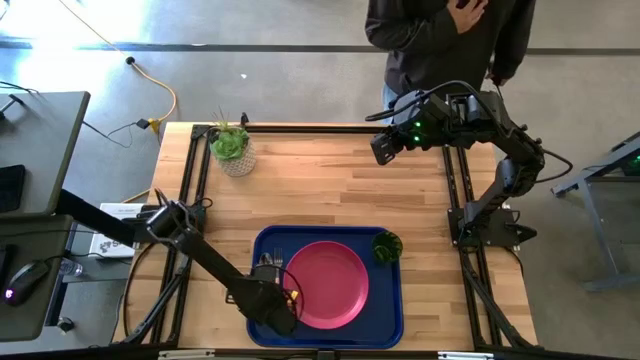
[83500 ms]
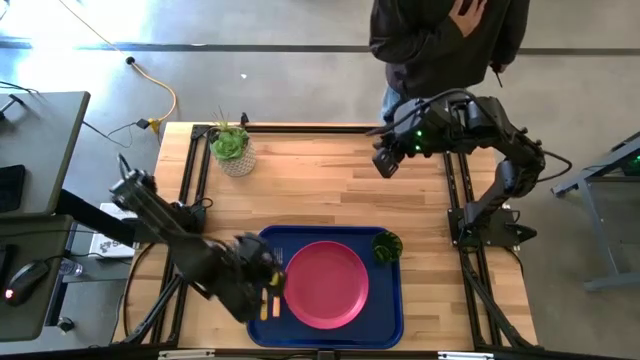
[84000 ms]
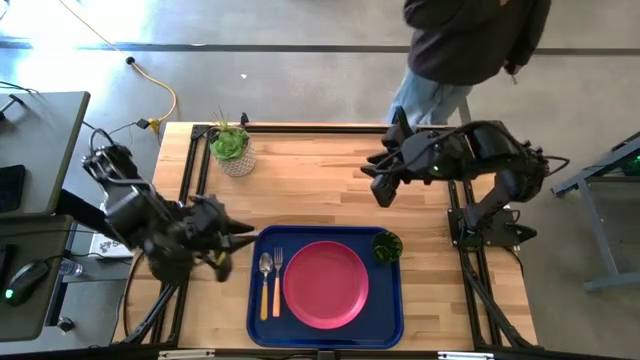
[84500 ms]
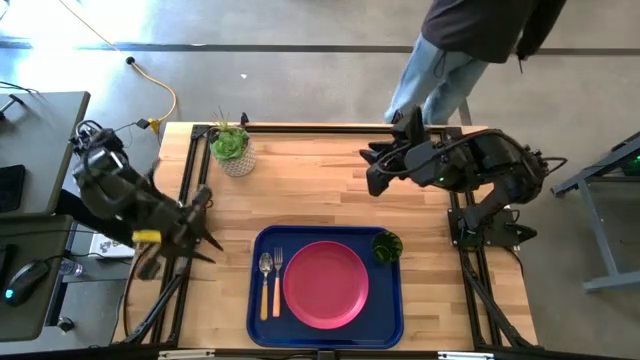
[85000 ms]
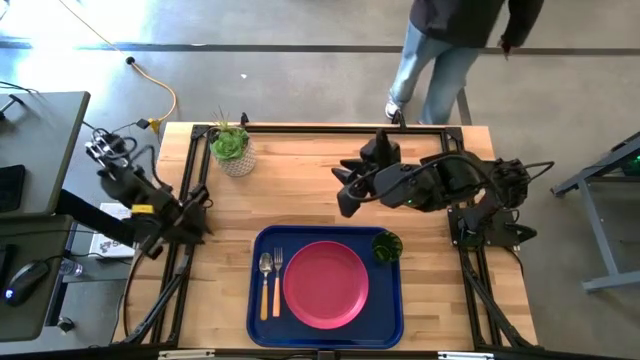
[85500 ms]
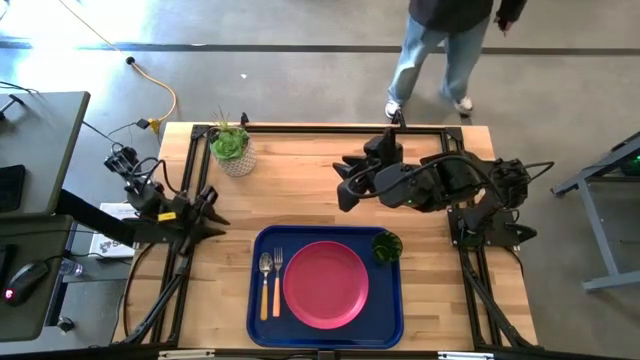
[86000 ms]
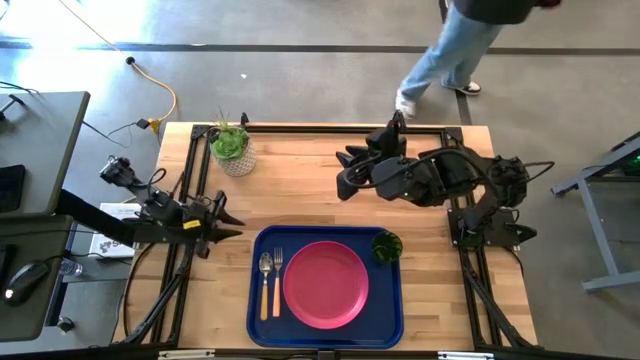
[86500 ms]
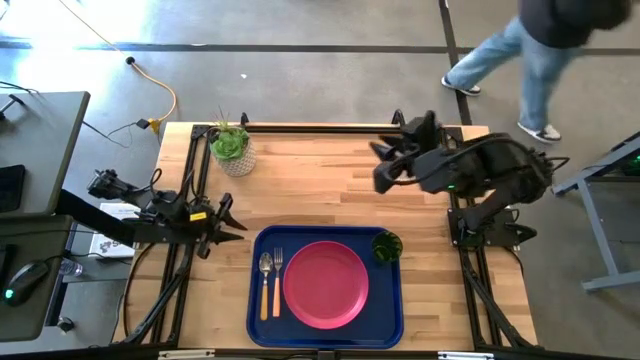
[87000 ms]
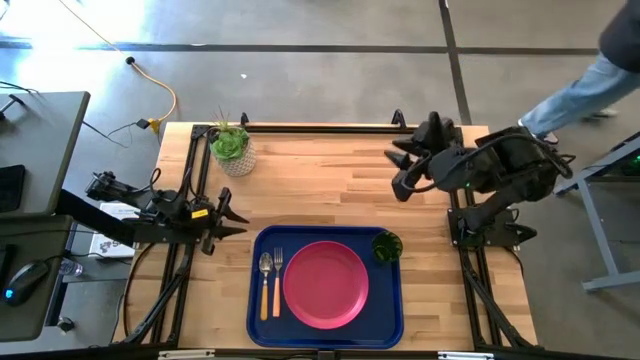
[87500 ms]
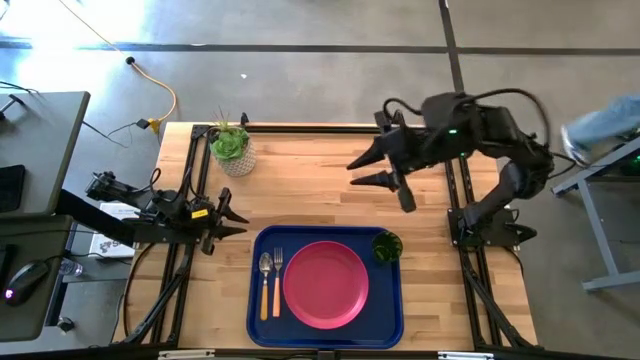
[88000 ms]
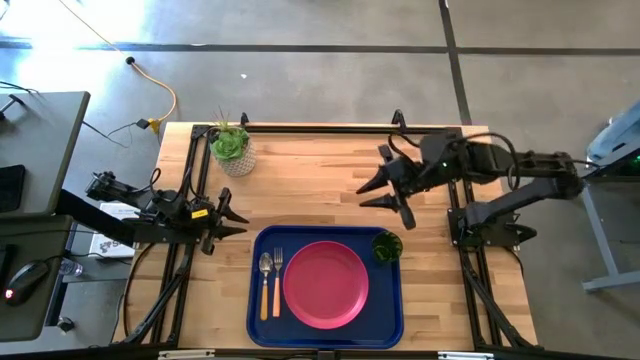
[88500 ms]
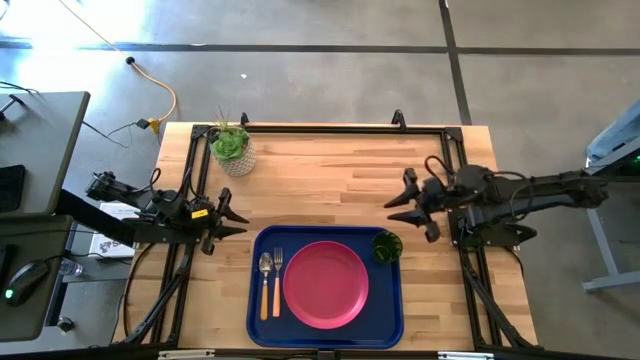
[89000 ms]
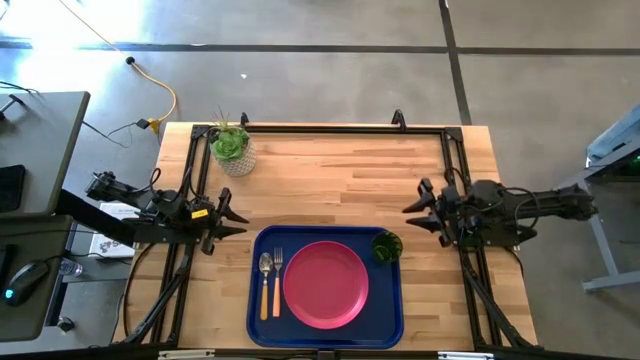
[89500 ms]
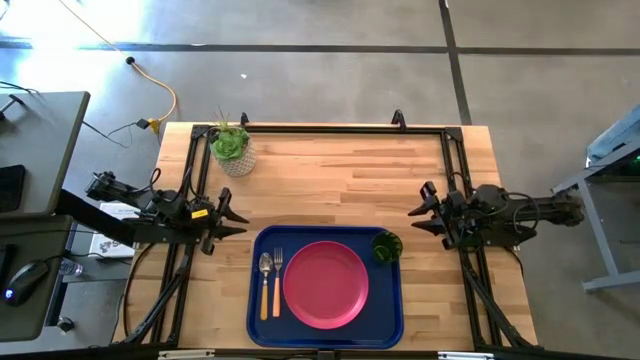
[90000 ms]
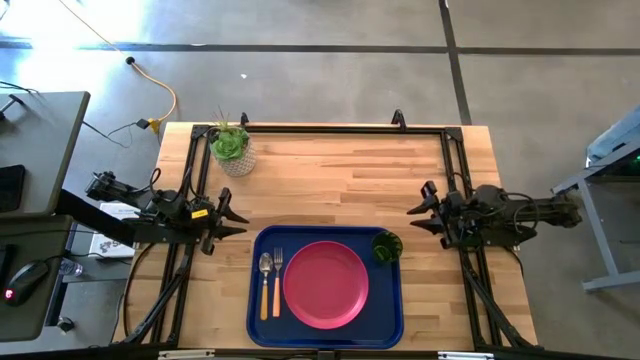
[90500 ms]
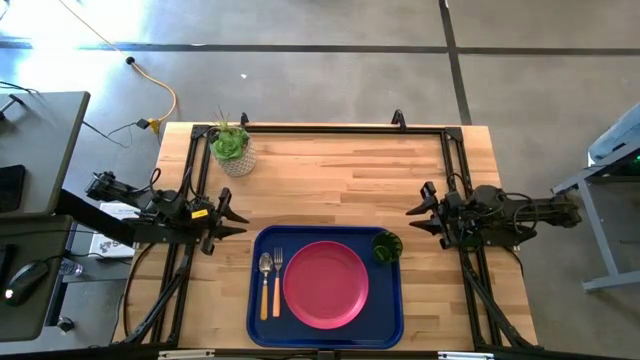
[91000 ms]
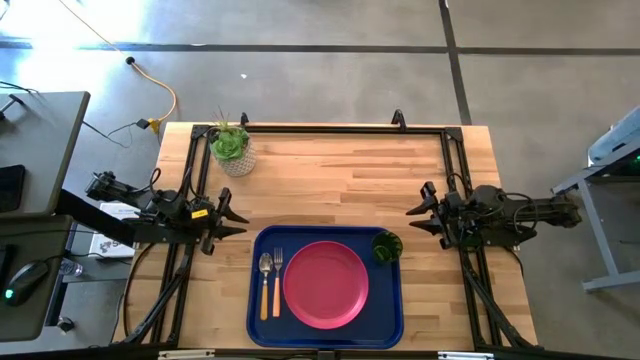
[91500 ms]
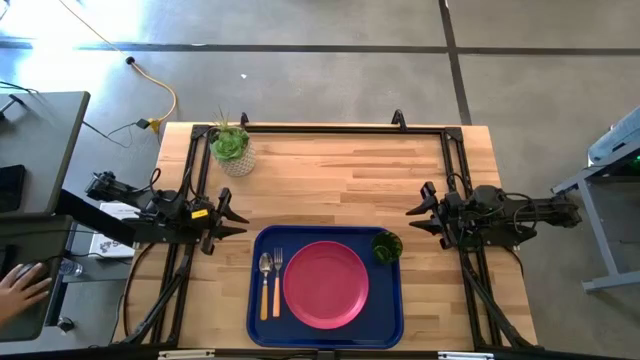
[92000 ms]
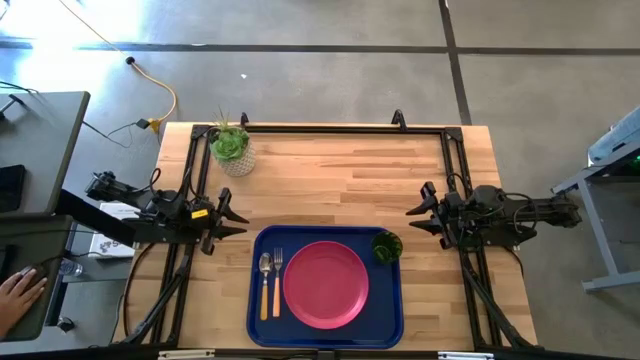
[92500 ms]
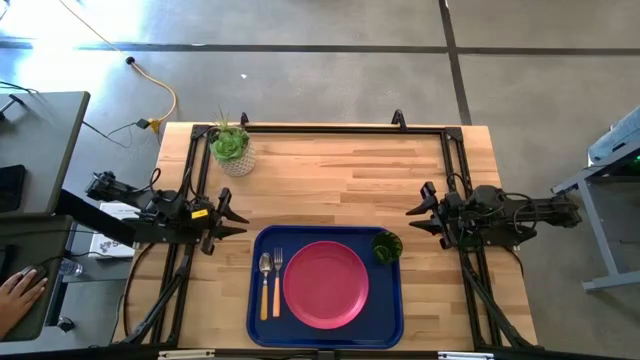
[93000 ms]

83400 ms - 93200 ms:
Task: Pick and place plate/cup/fork/spoon on tray
Return to Home Position

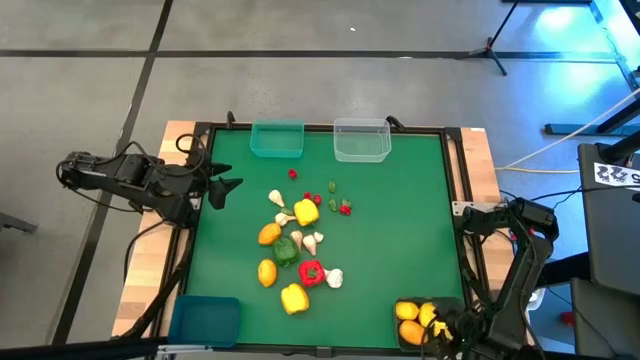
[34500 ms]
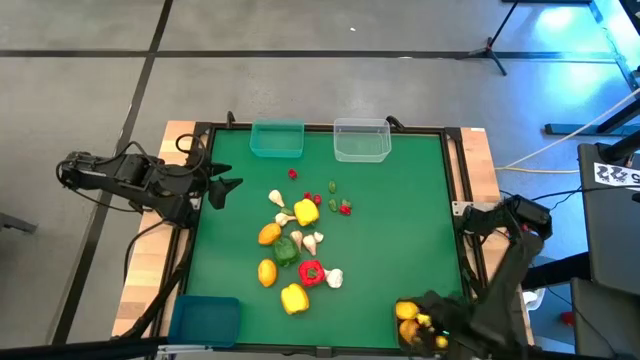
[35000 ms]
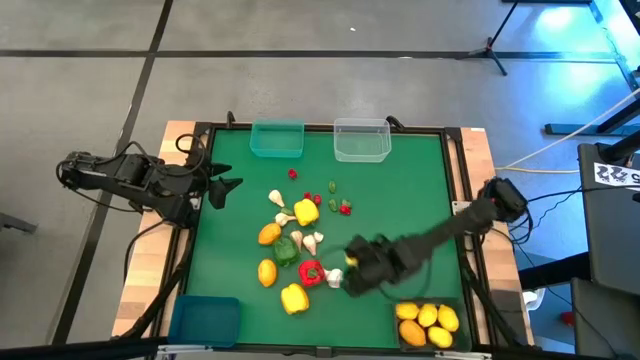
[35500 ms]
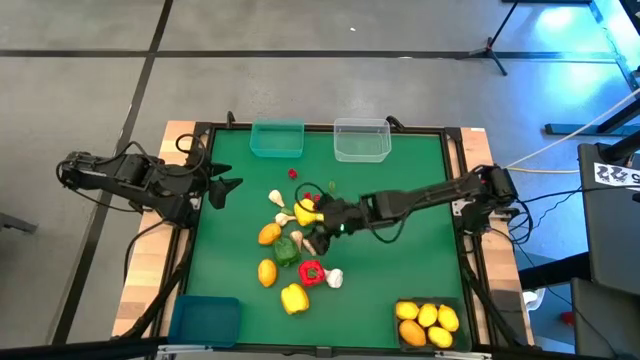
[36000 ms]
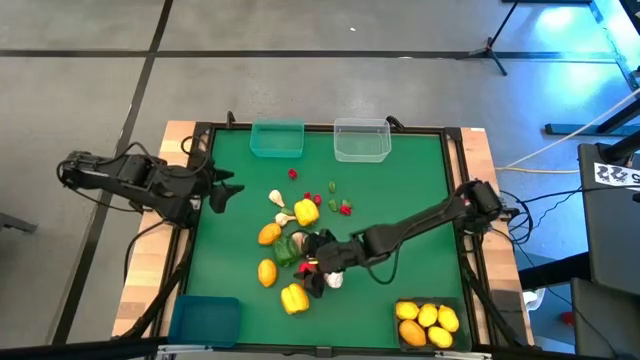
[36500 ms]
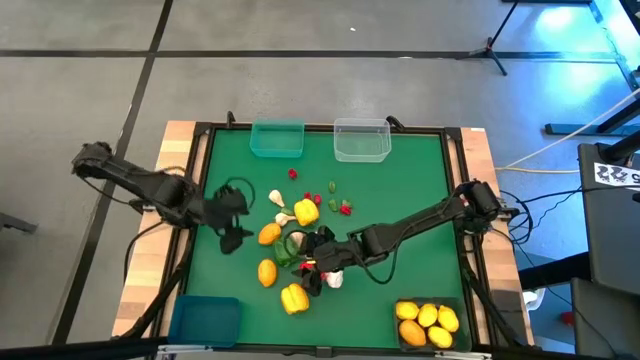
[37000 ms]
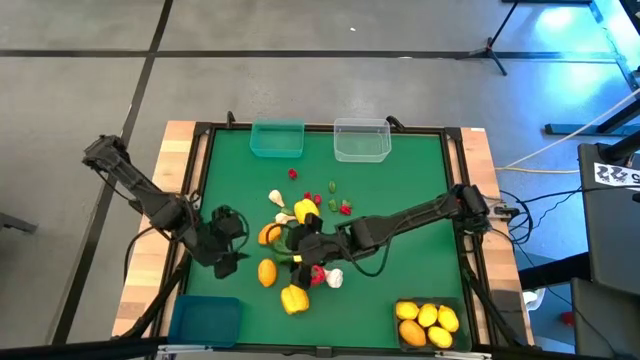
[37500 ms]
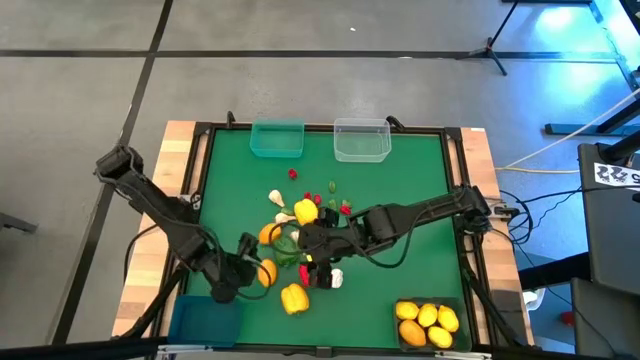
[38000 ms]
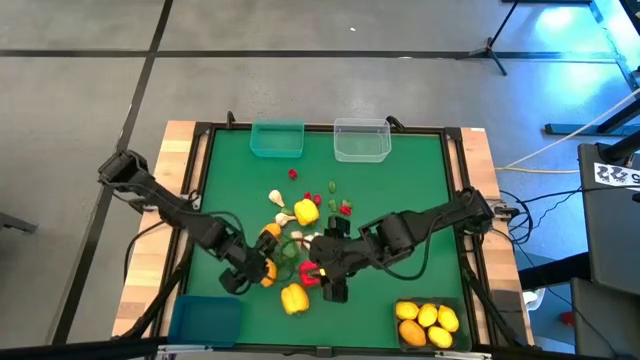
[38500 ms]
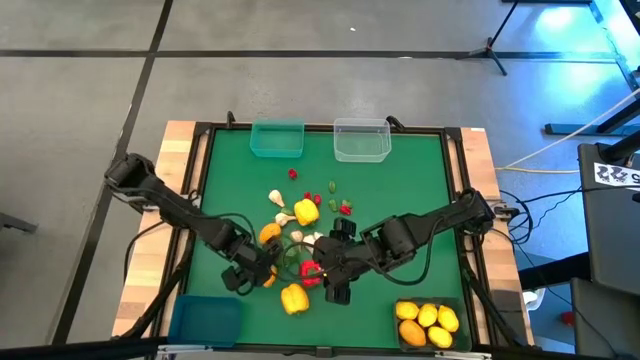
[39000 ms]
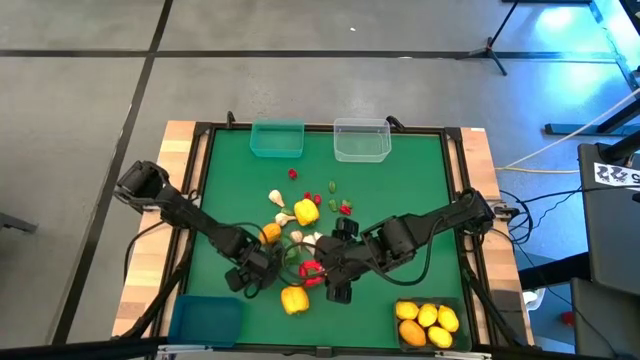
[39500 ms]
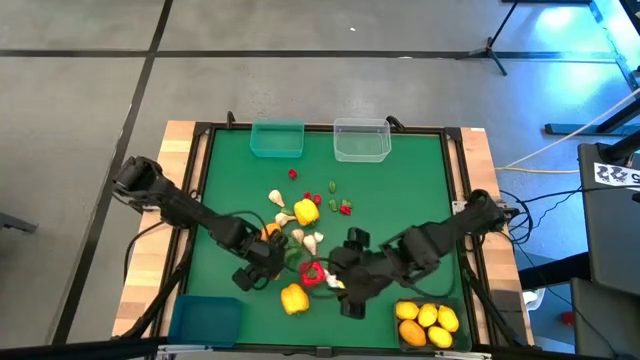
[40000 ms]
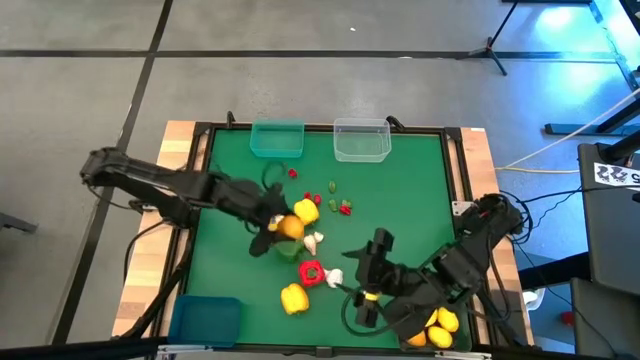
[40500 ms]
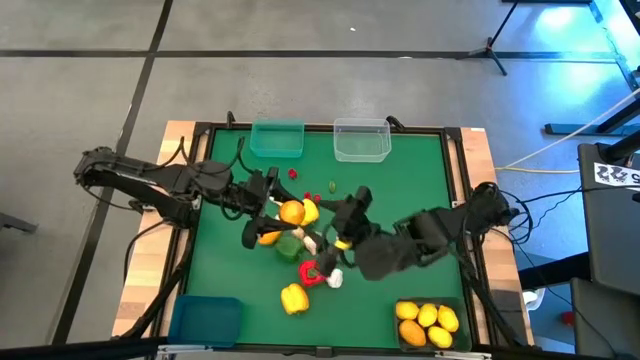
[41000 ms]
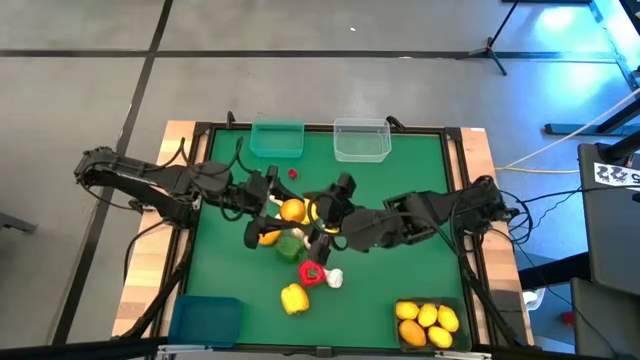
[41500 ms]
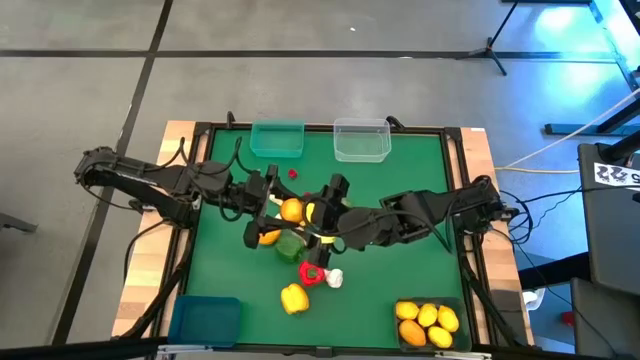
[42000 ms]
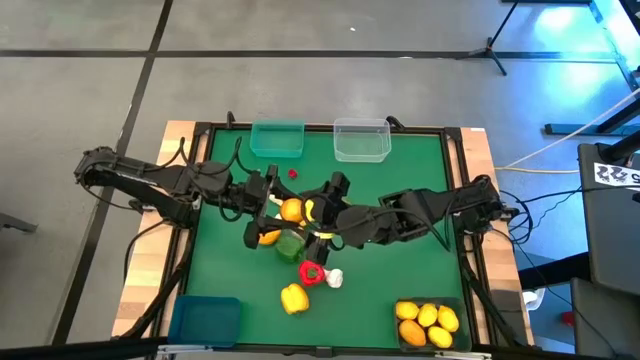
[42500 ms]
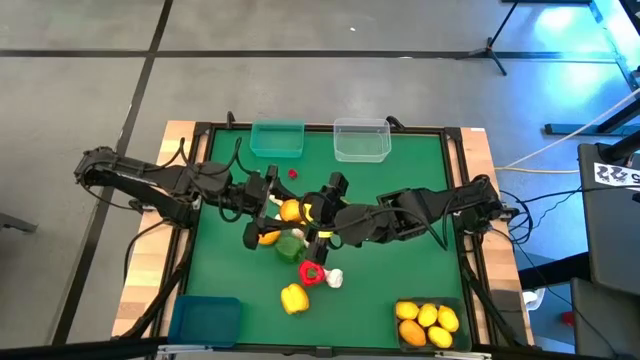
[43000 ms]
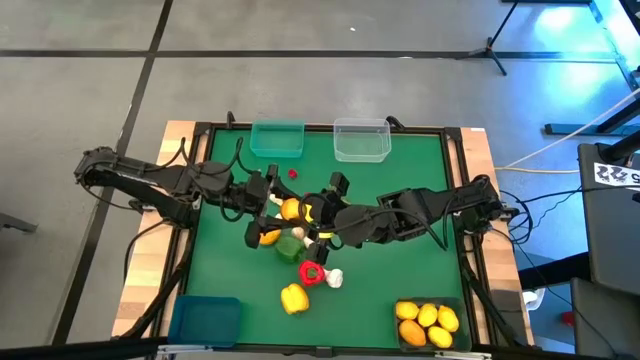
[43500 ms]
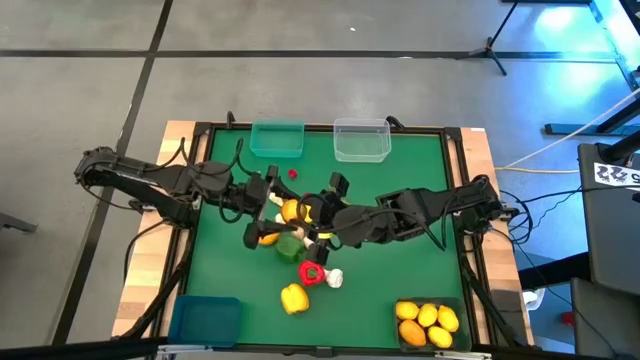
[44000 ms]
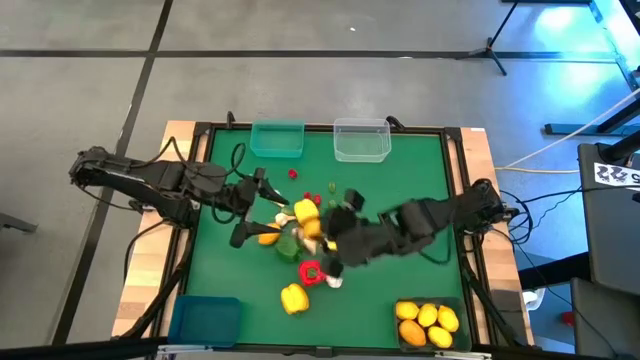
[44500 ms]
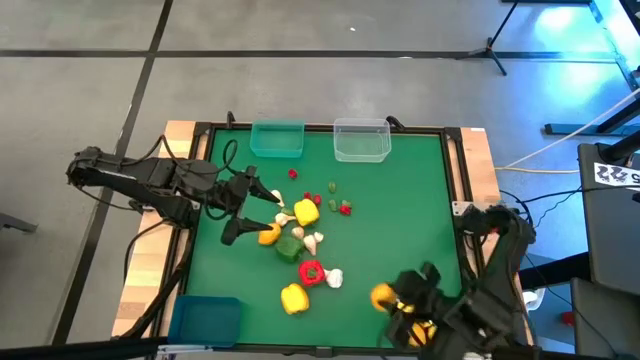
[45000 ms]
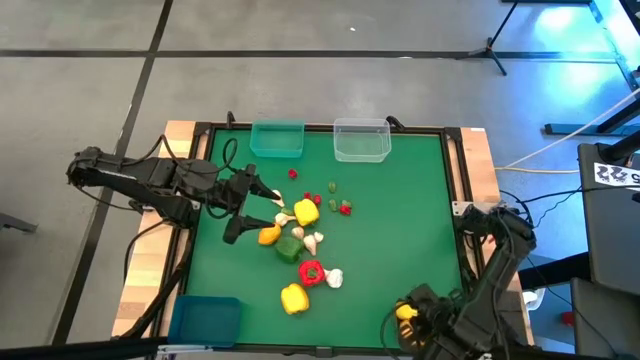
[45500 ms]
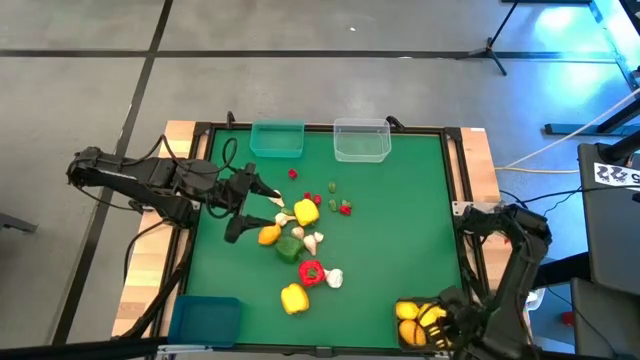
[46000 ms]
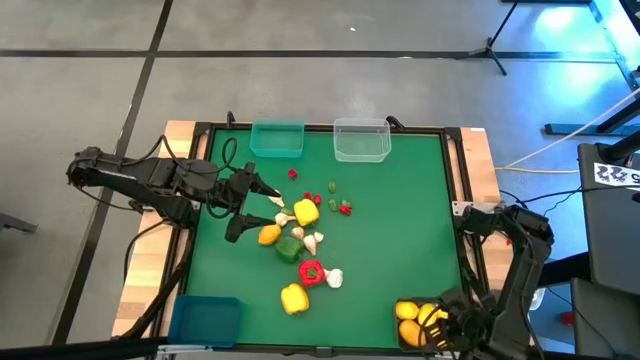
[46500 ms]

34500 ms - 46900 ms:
Task: Sort produce into baskets
Put the lemon into the black bin
